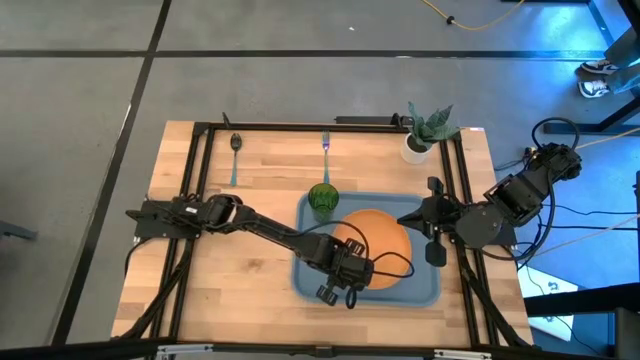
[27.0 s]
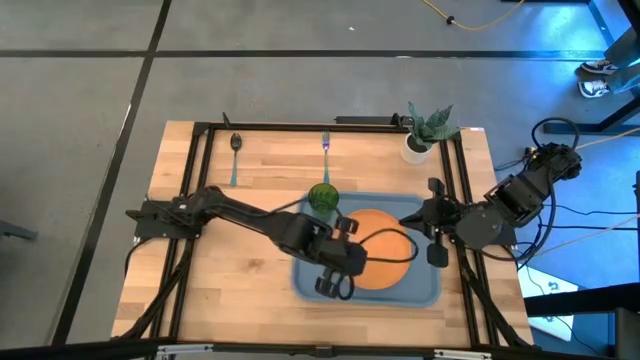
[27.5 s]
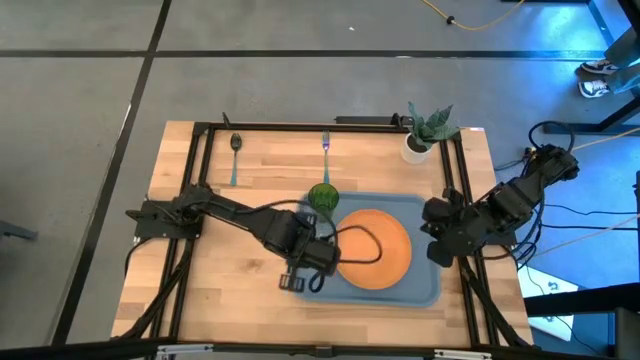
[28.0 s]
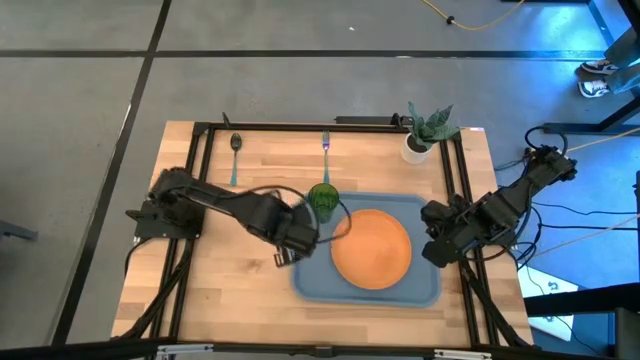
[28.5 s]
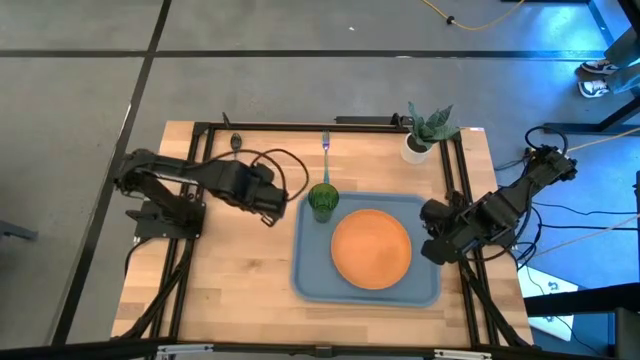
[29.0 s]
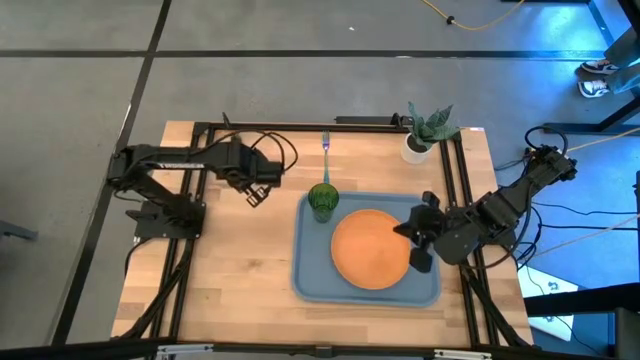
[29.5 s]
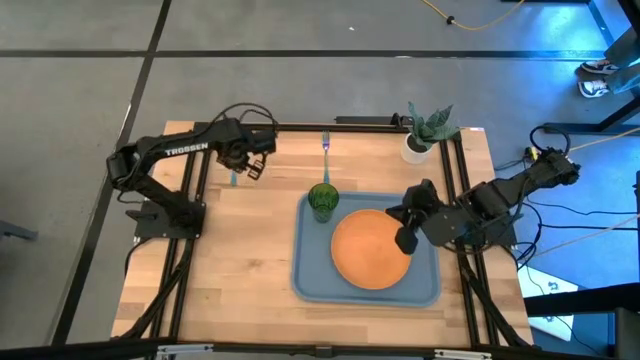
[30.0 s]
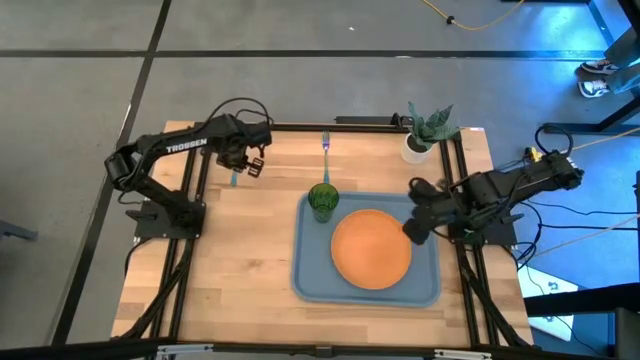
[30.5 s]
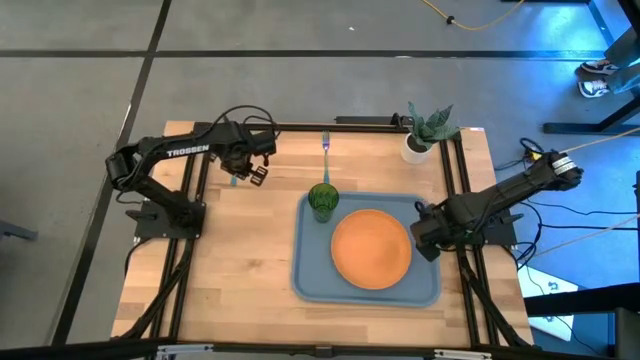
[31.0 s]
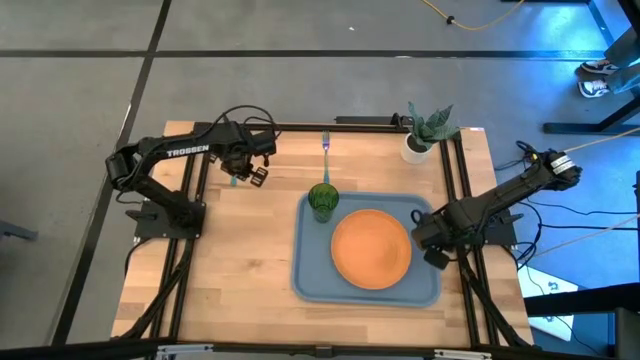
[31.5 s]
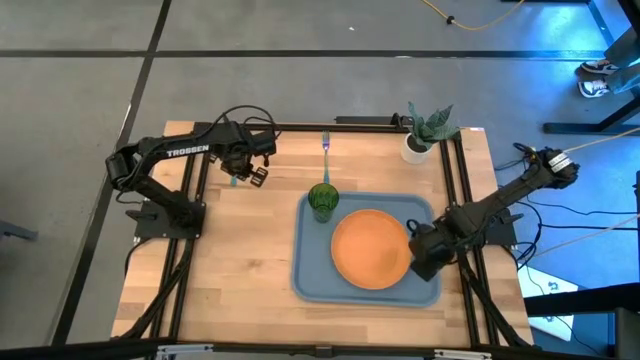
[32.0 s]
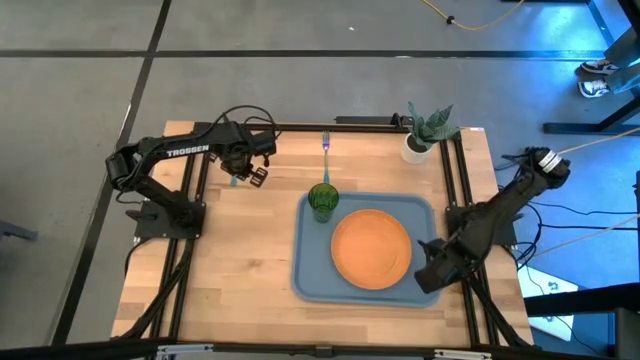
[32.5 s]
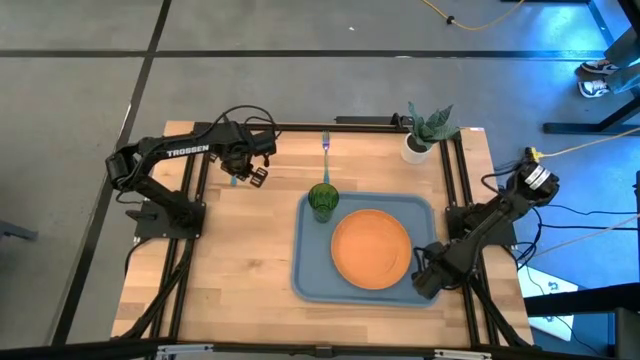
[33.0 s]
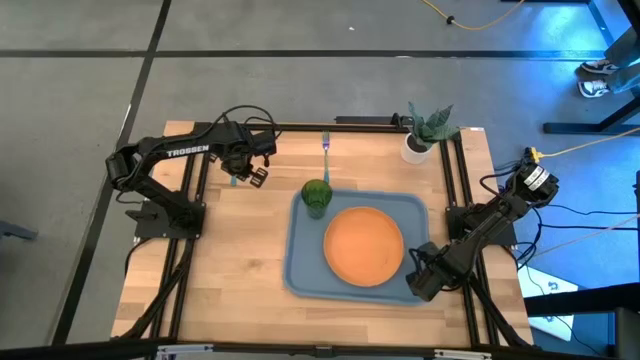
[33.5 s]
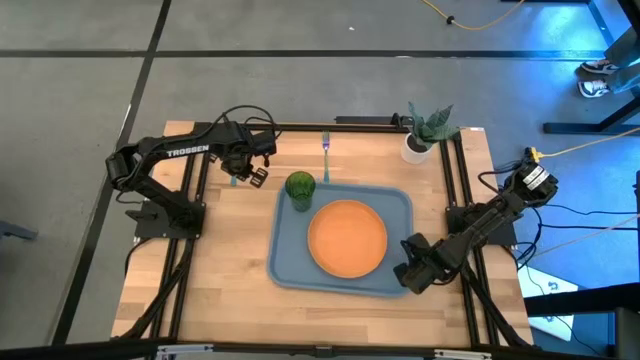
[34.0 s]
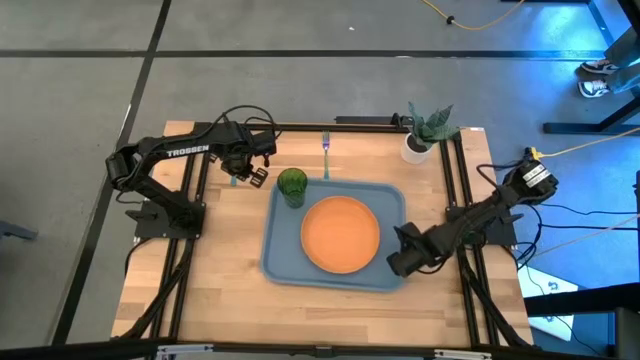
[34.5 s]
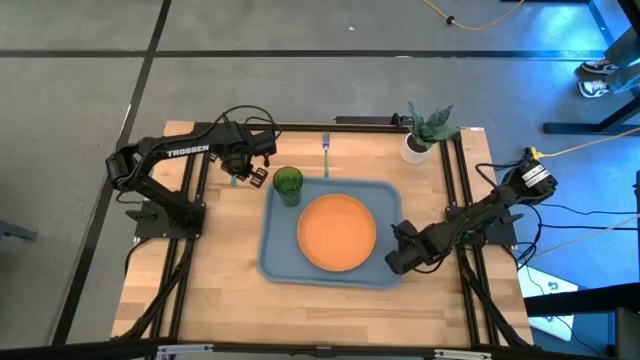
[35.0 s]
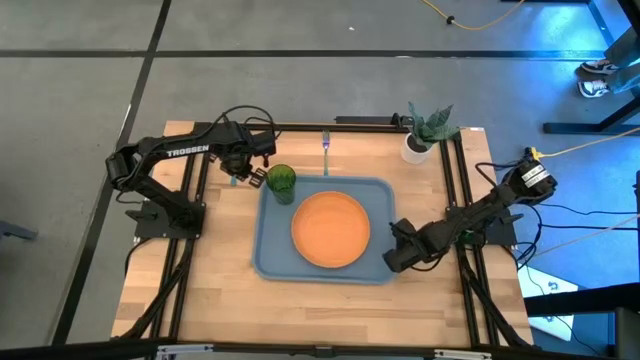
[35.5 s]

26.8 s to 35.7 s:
Task: Pick and place plate/cup/fork/spoon on tray
Move the blue tray to the center of the table

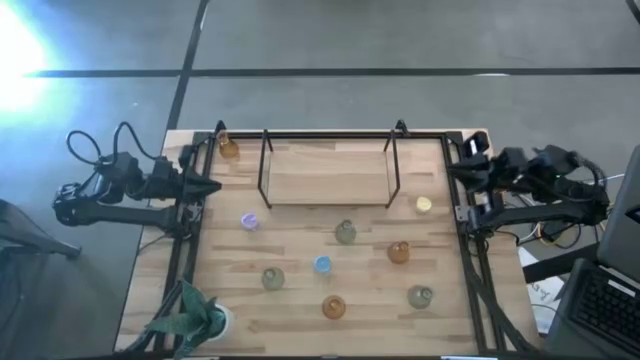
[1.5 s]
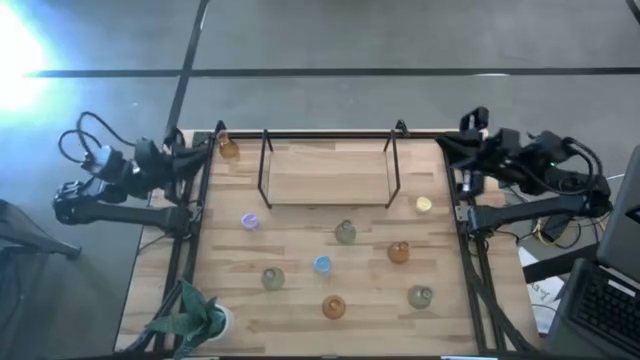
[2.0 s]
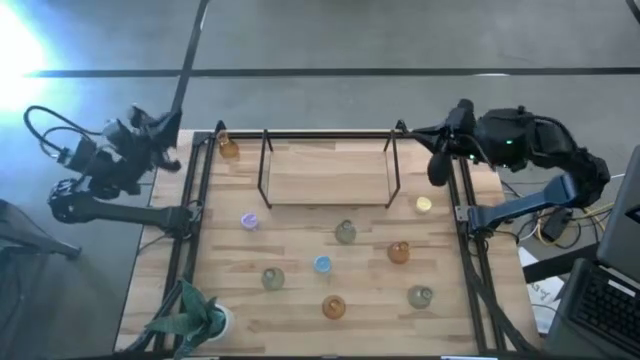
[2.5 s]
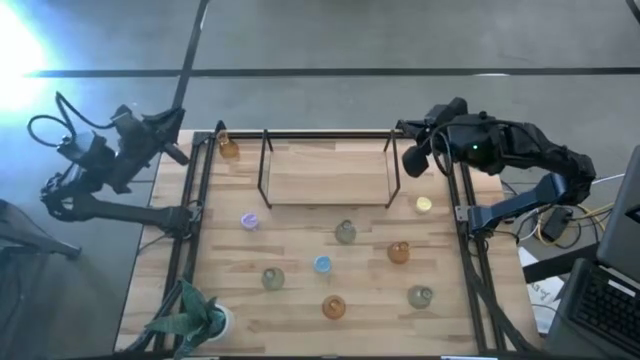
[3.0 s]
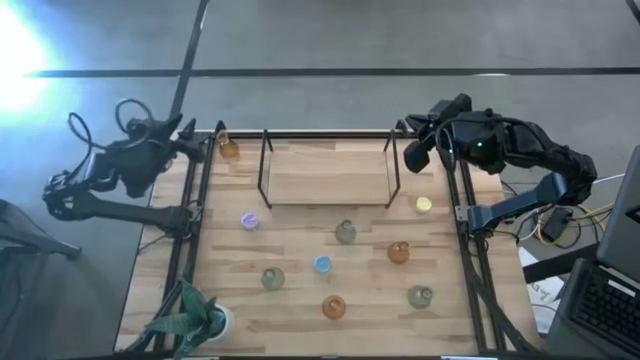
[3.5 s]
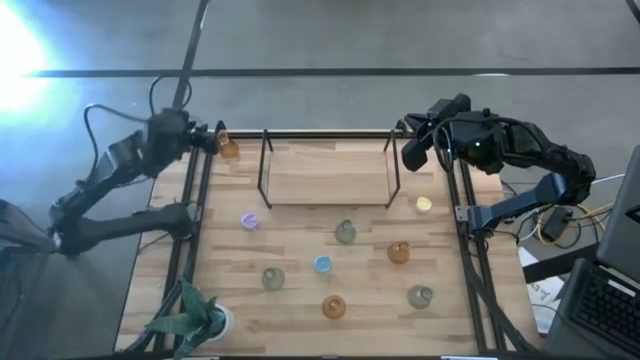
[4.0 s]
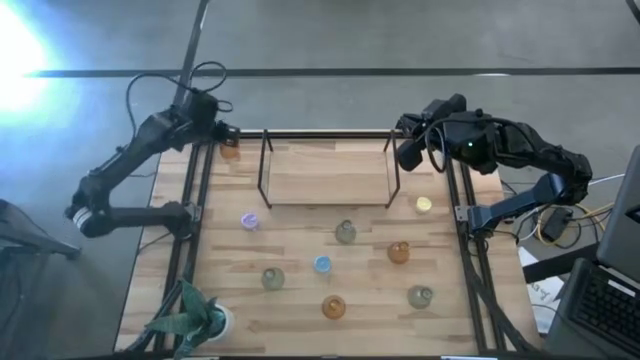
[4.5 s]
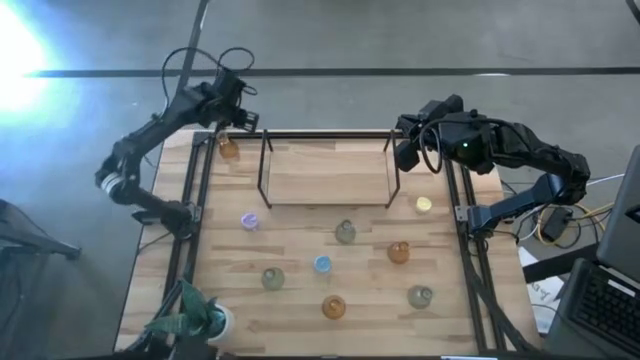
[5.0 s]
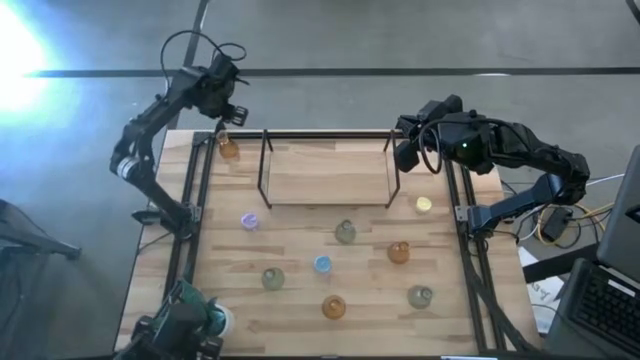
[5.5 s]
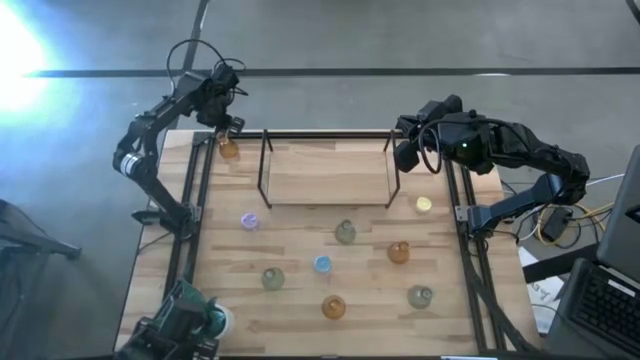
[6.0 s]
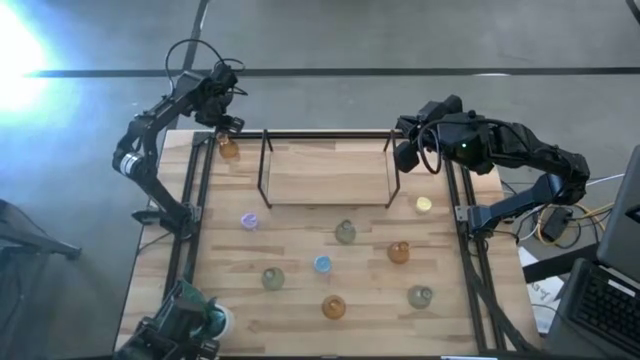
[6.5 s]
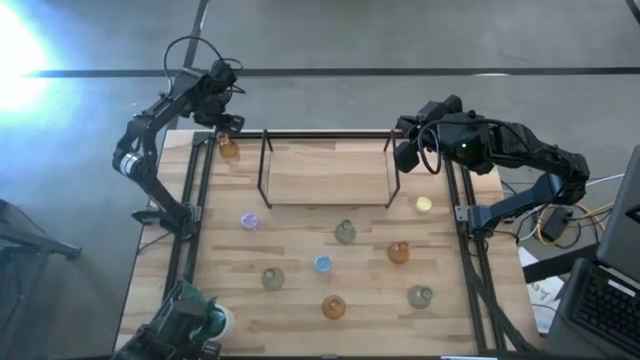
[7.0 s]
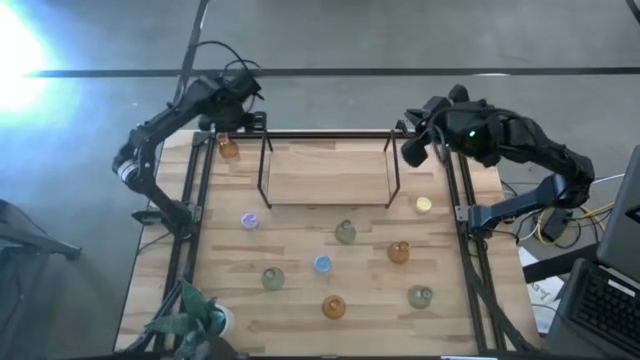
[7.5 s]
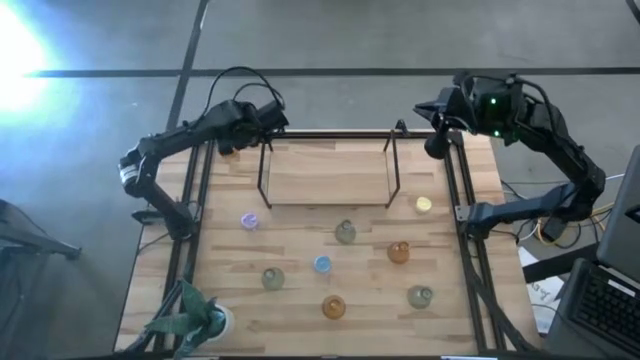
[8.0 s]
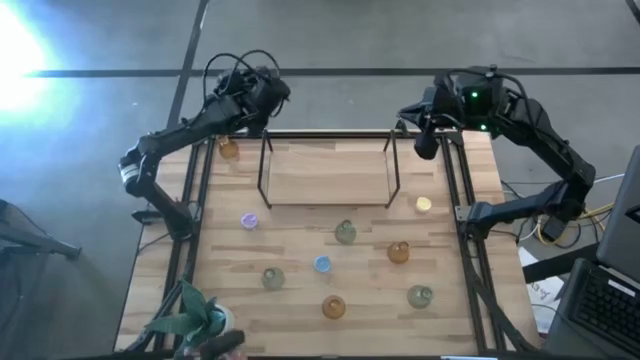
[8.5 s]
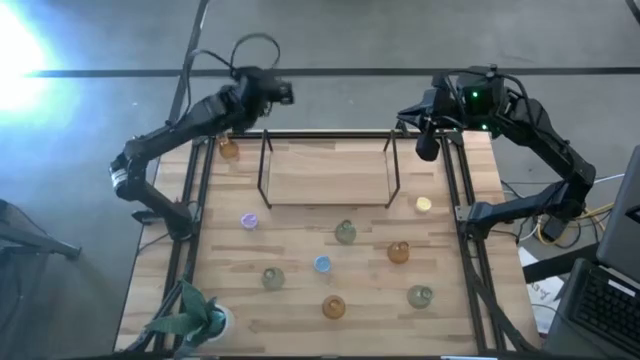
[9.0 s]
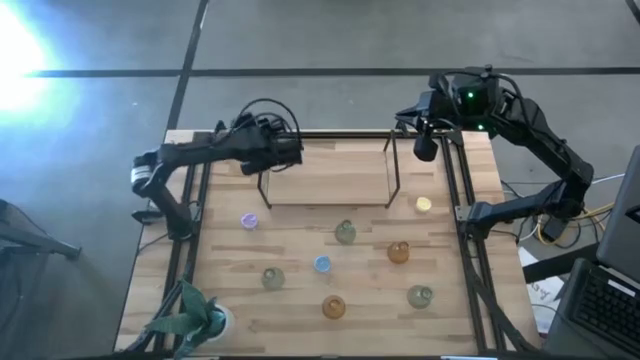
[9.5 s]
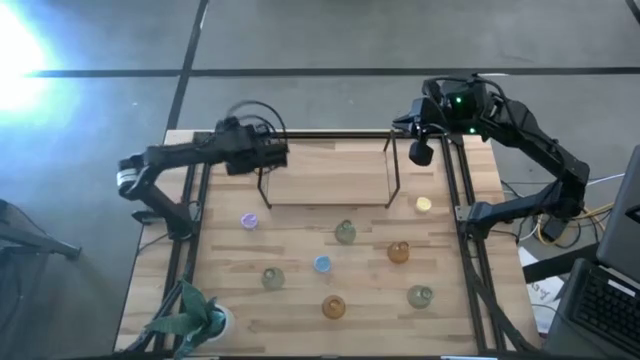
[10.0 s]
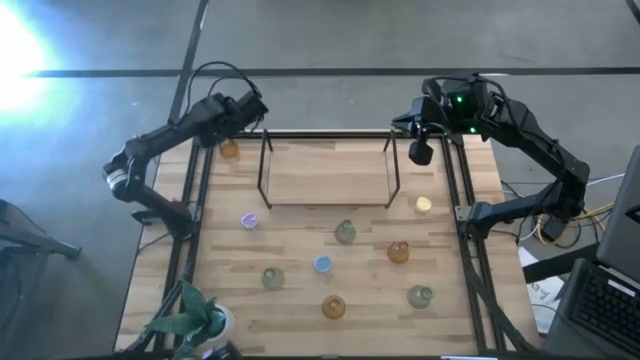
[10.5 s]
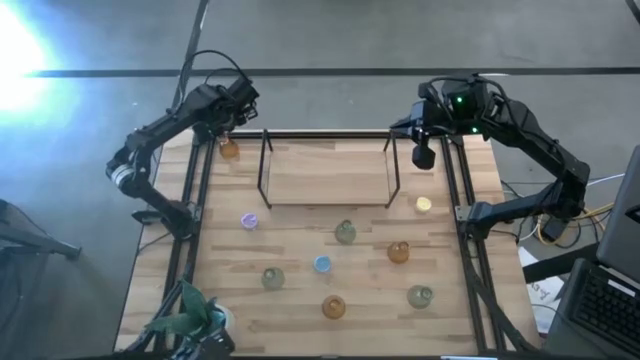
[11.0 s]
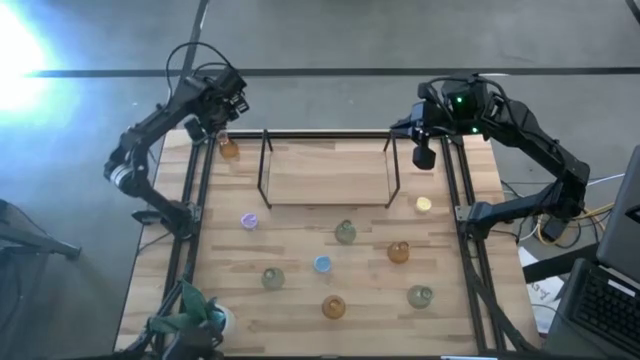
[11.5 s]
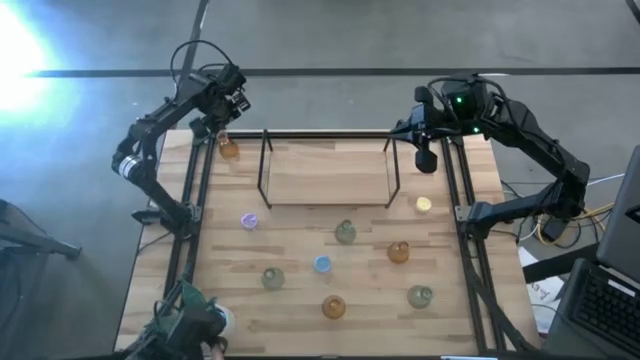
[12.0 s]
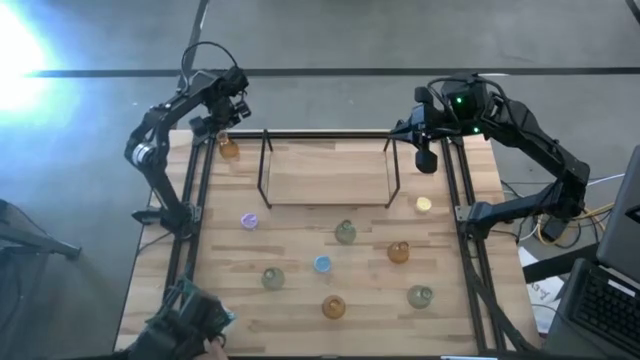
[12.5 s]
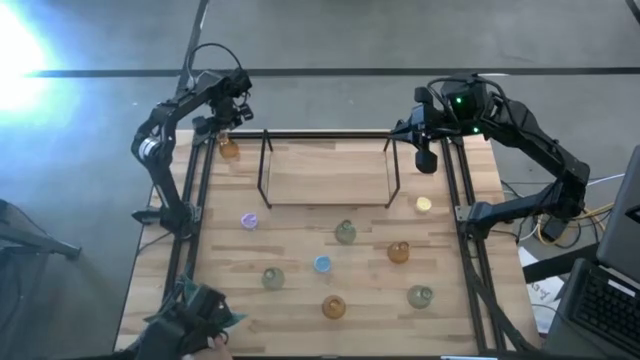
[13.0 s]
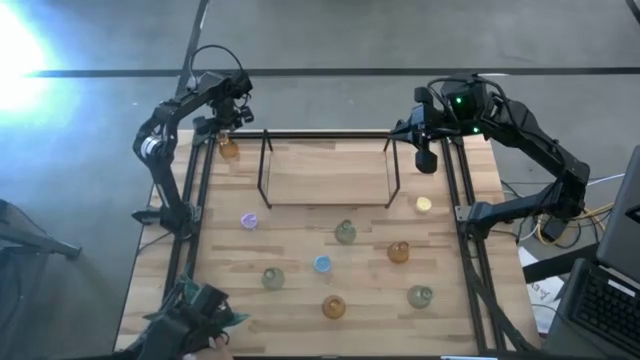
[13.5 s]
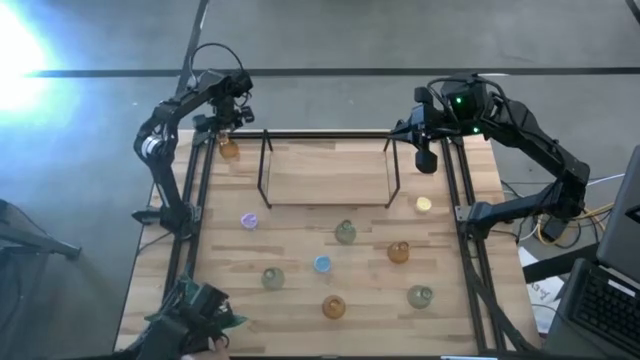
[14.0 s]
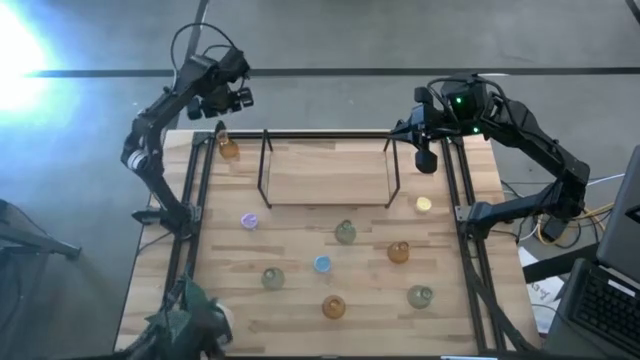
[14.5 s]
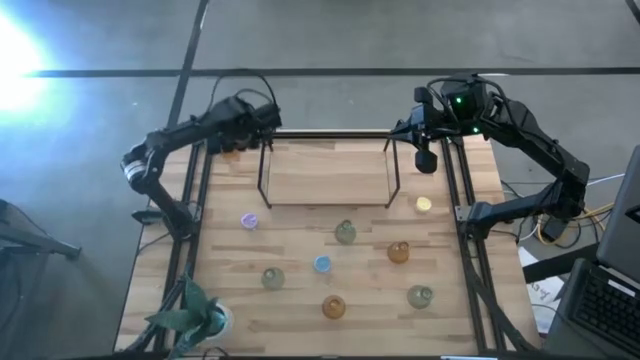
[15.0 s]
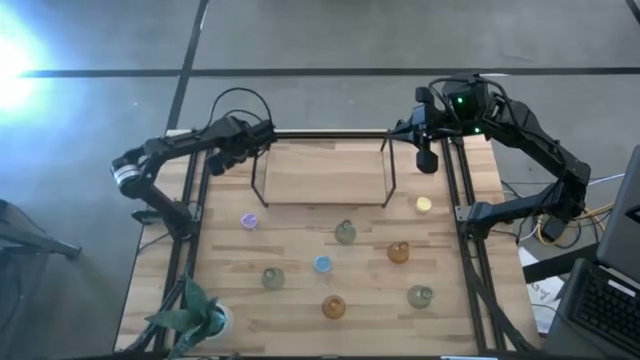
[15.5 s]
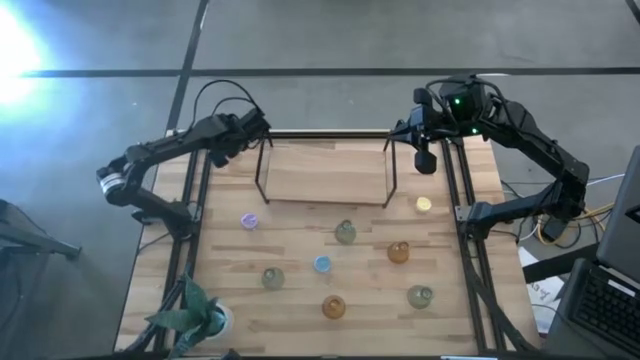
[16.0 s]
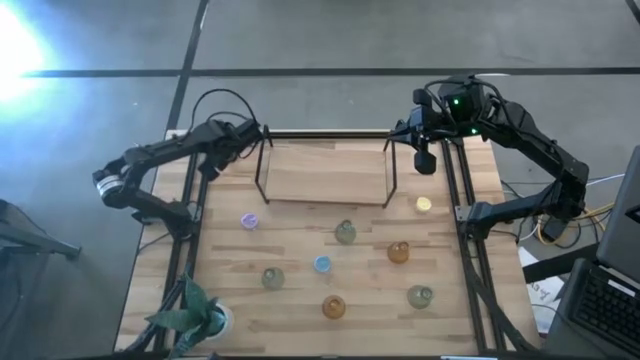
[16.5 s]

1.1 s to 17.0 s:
Task: Pick & Place candle stick holders
Put the top left yellow glass candle holder on the shelf
